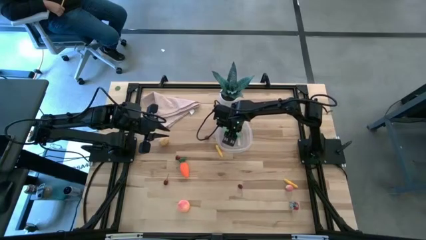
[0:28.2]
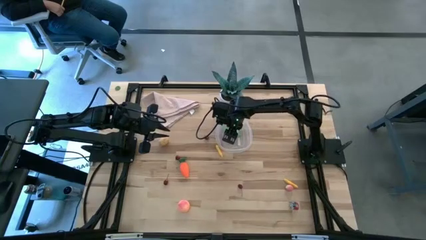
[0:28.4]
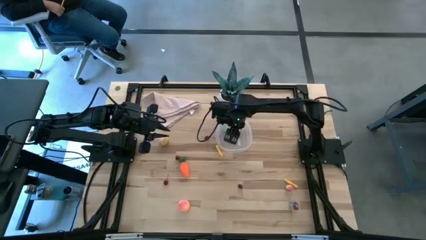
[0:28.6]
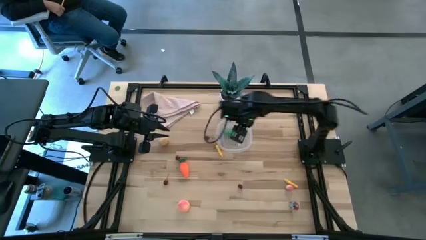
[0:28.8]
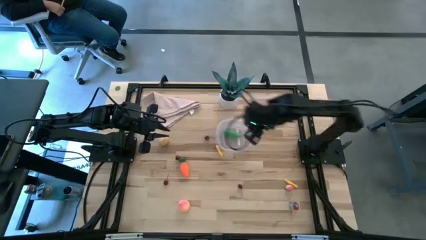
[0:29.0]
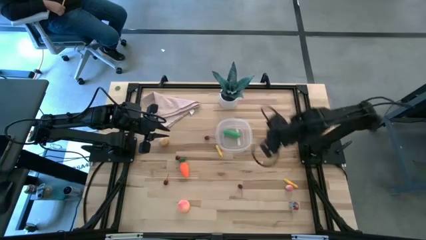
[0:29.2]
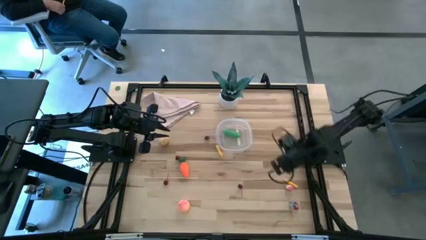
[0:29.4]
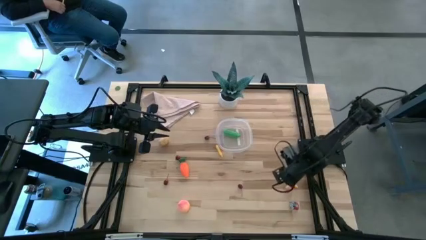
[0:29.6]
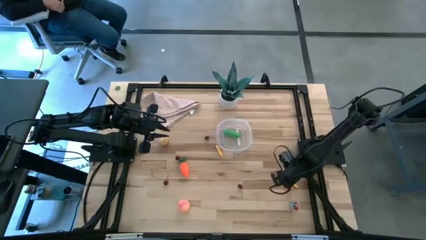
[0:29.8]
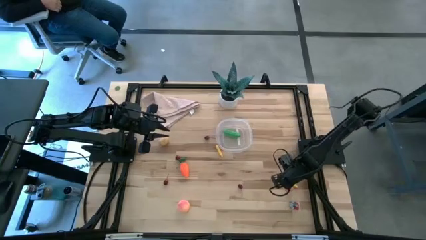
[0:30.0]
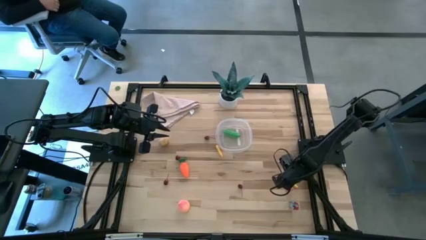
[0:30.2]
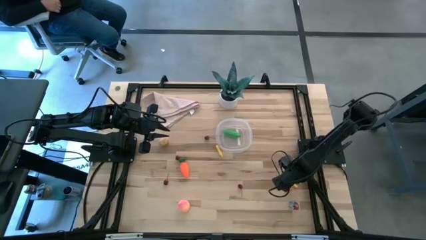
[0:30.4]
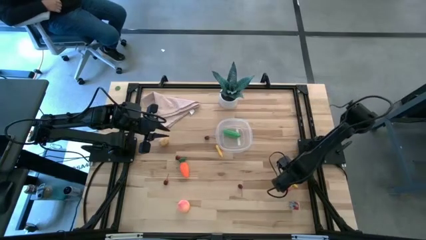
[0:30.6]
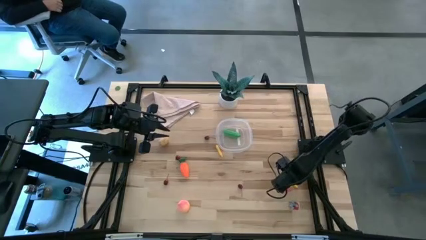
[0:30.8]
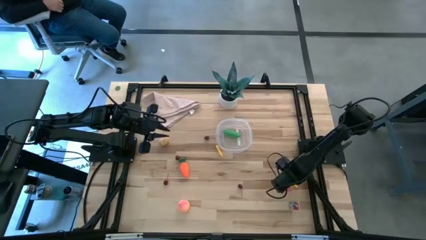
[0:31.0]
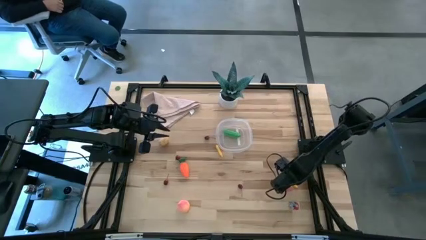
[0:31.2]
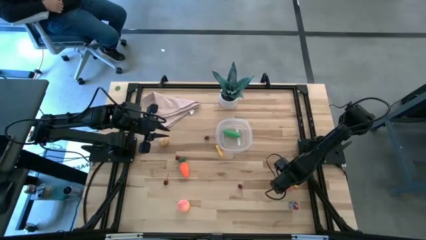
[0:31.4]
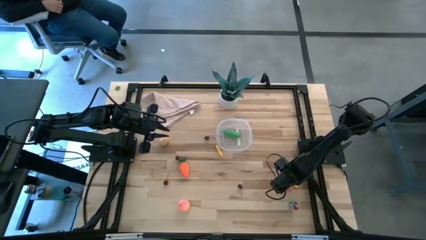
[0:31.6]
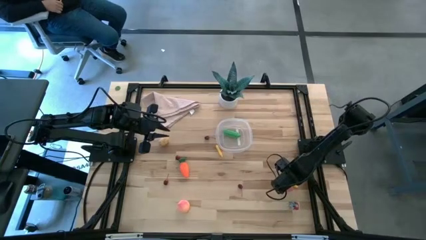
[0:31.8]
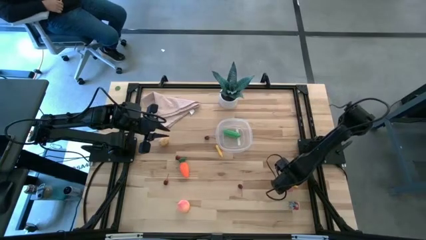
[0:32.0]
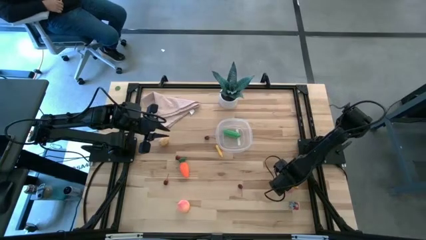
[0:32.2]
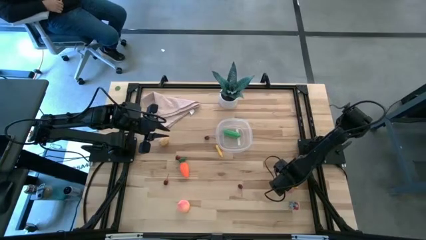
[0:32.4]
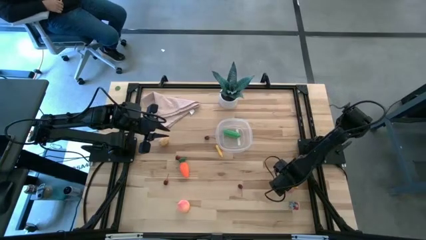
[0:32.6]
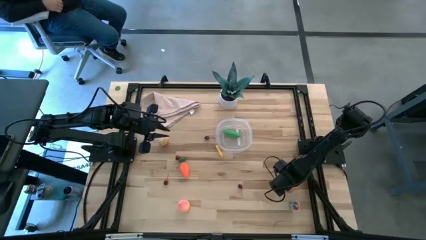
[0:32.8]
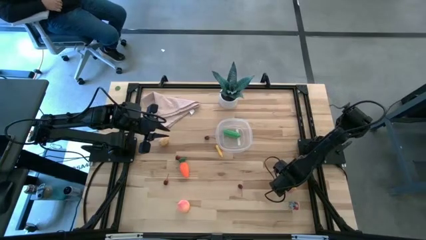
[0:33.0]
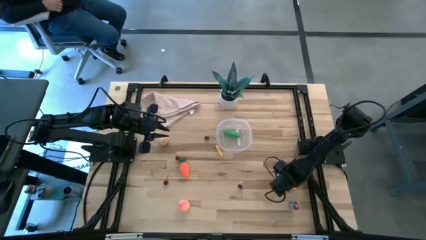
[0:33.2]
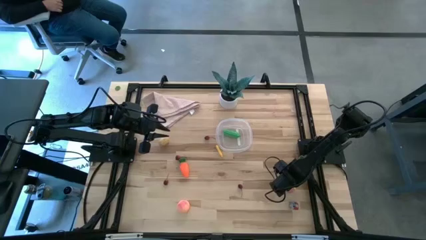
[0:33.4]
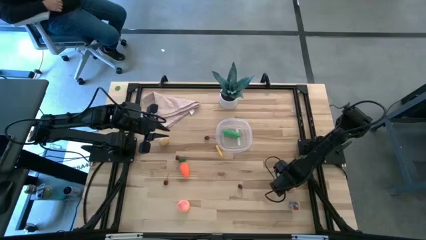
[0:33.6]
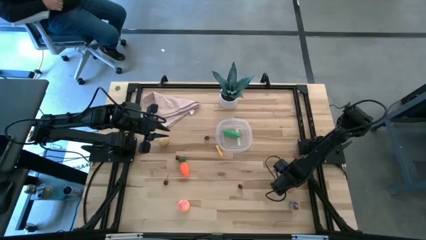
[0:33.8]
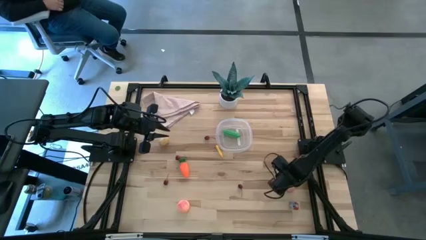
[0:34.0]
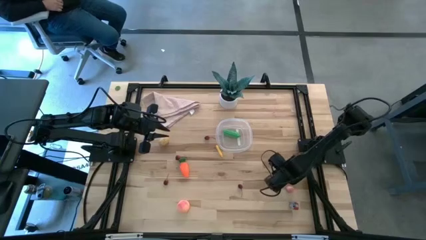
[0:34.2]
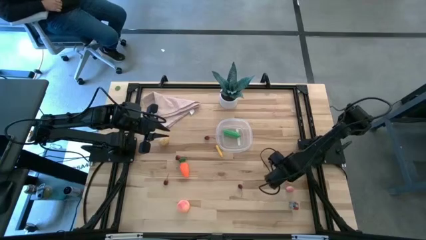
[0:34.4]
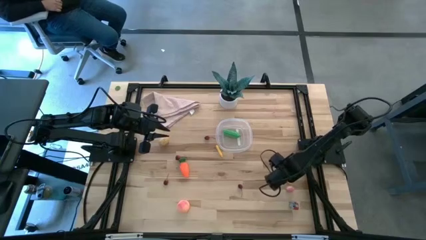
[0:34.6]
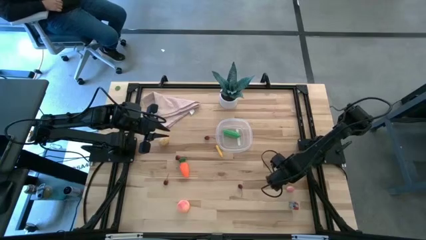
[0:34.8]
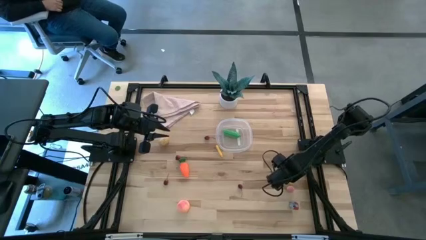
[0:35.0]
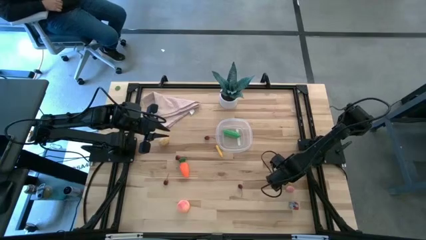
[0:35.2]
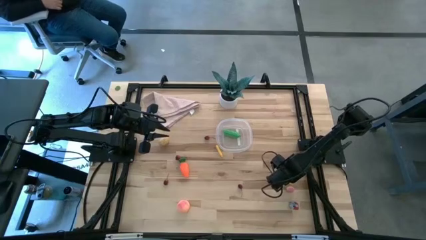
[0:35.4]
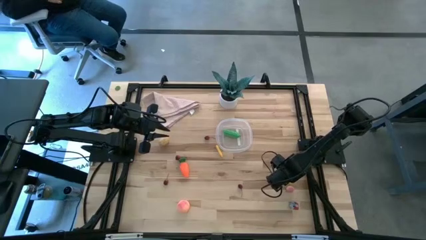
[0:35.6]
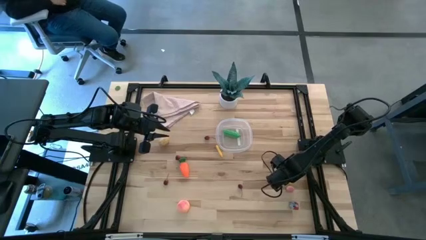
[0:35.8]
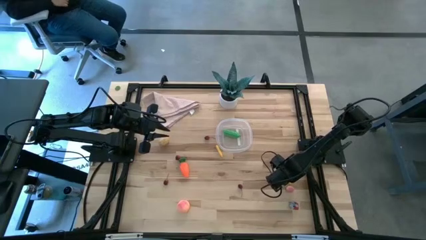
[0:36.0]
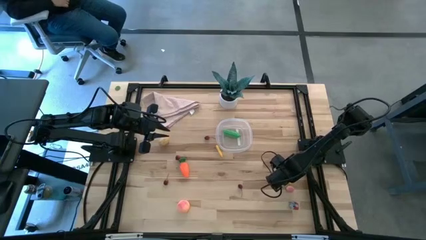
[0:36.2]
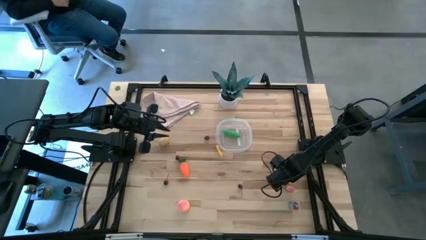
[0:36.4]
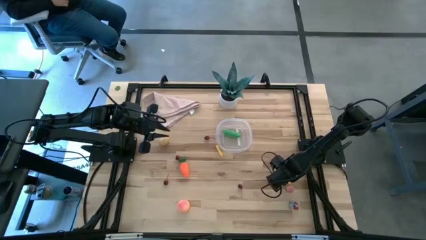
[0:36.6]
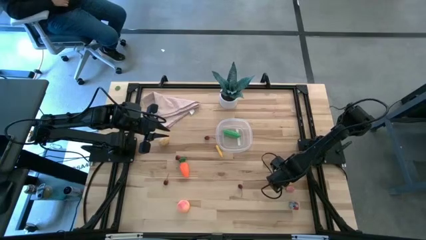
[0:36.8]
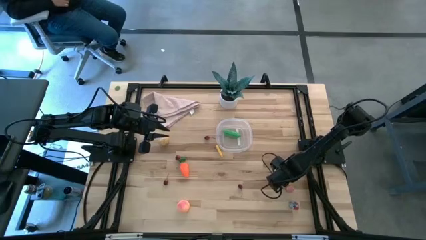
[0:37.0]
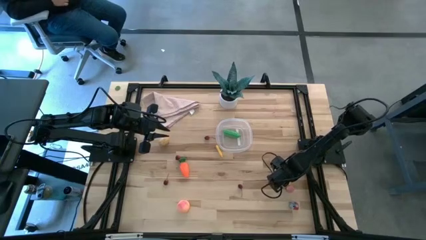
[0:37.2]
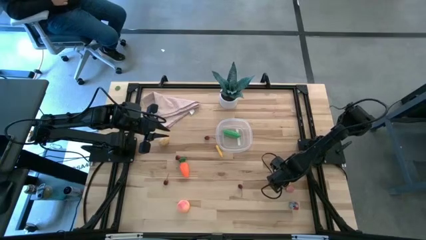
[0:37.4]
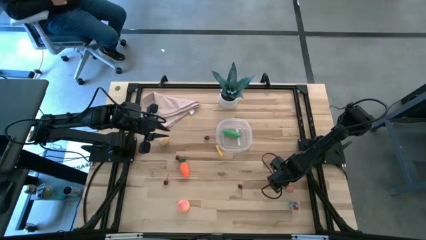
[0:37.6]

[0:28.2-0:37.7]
Task: Pick and placing Produce into tupperware
Put the corn into the transparent bin

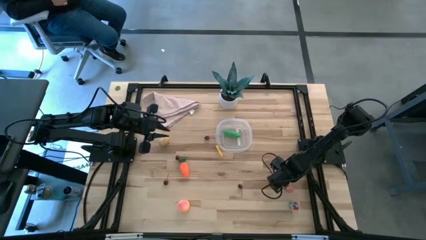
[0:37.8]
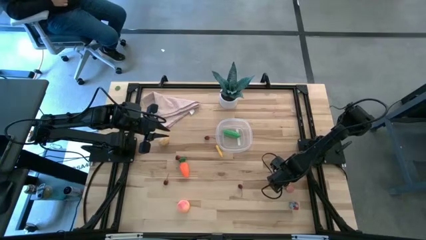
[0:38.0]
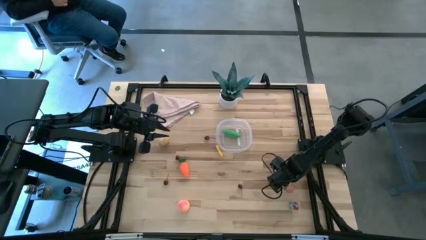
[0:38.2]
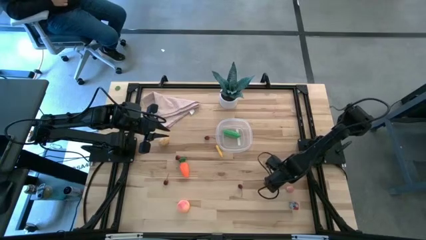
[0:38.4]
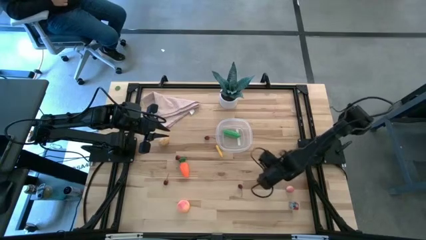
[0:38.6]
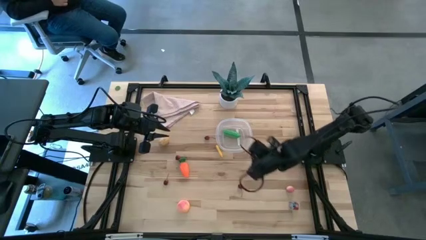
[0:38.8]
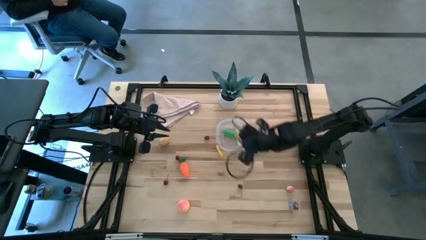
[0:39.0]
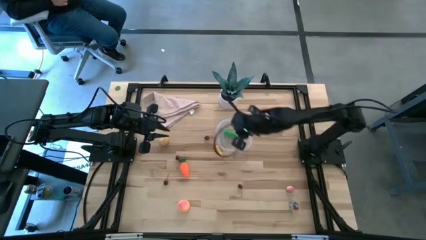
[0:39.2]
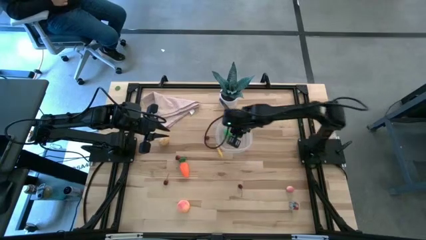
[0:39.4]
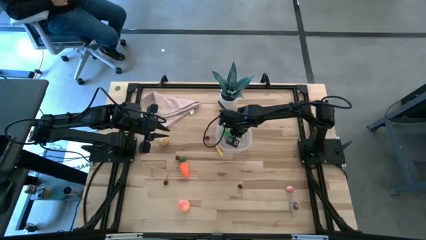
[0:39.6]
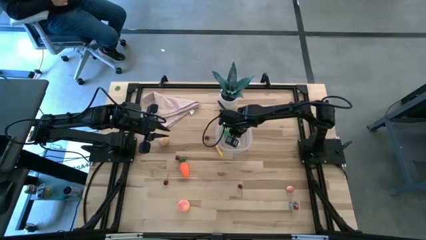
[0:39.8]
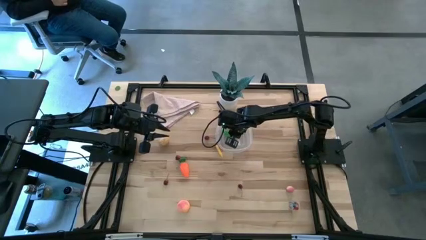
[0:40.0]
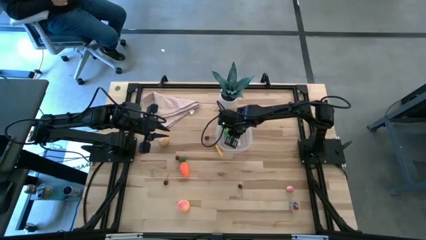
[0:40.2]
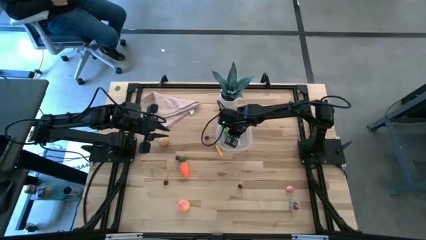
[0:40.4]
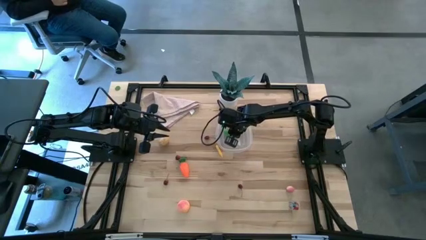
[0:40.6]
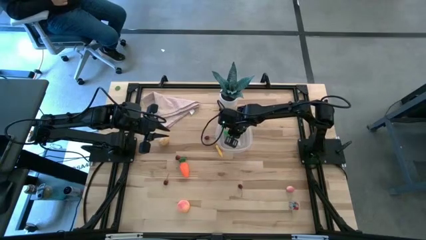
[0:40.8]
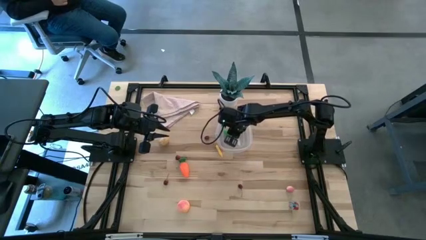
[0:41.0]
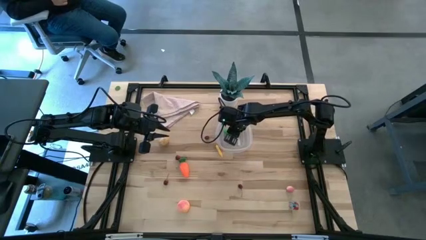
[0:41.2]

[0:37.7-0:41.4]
Put the corn into the transparent bin
